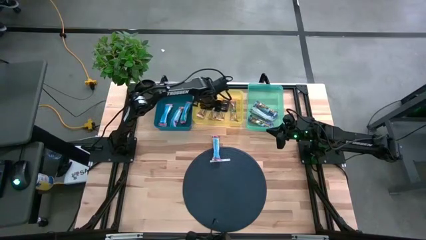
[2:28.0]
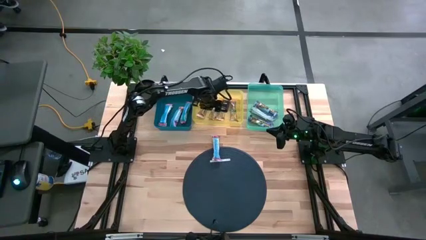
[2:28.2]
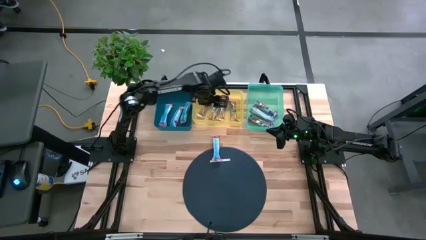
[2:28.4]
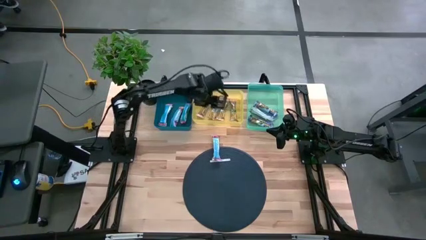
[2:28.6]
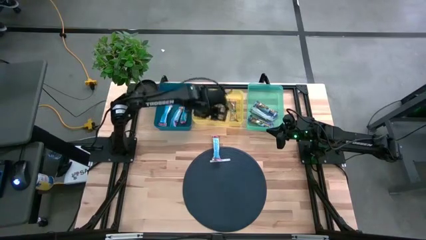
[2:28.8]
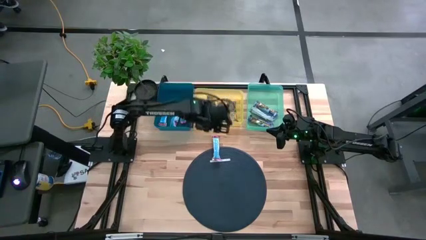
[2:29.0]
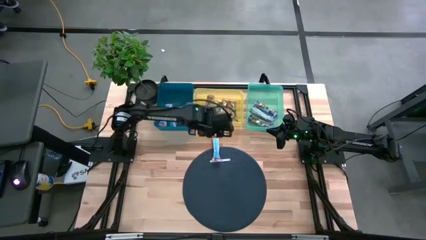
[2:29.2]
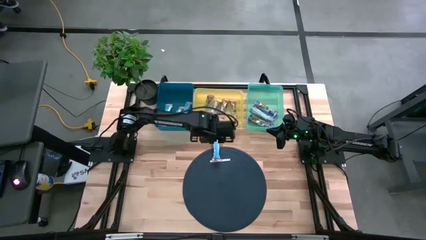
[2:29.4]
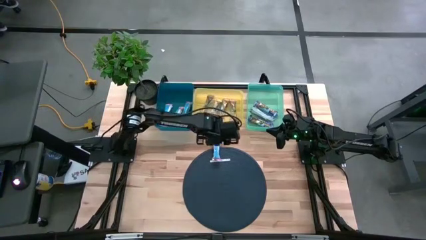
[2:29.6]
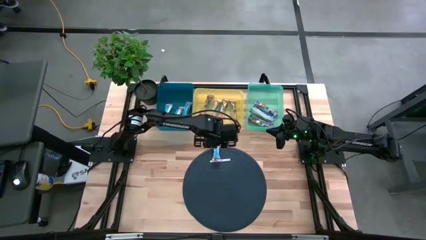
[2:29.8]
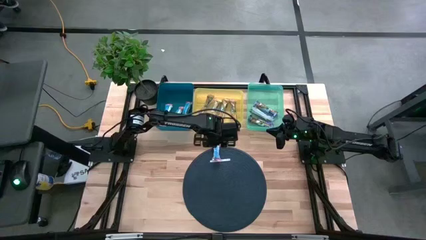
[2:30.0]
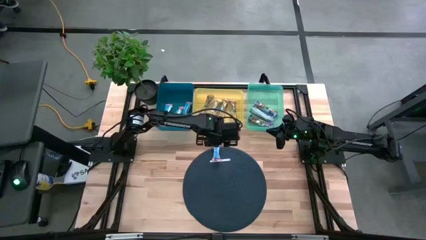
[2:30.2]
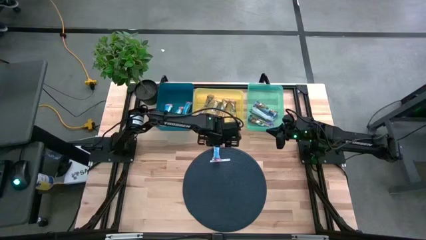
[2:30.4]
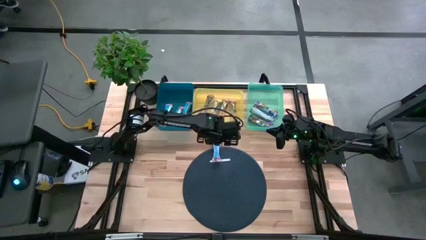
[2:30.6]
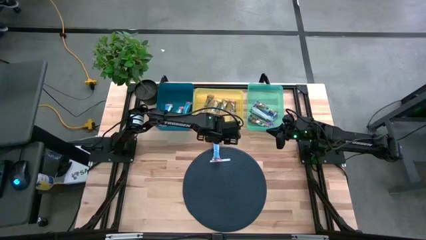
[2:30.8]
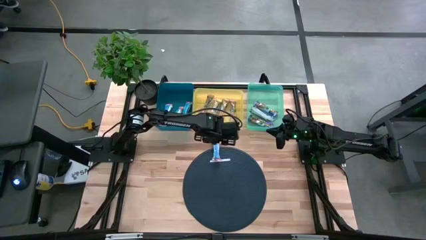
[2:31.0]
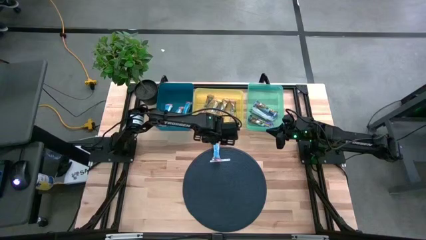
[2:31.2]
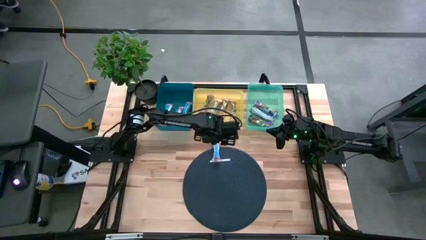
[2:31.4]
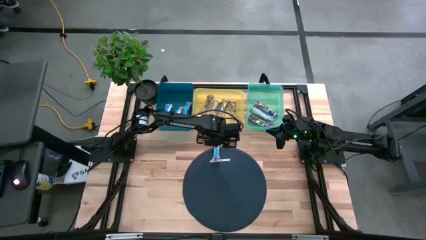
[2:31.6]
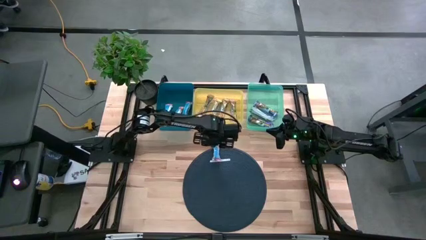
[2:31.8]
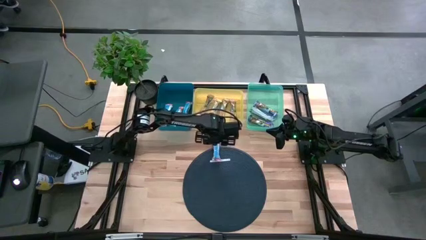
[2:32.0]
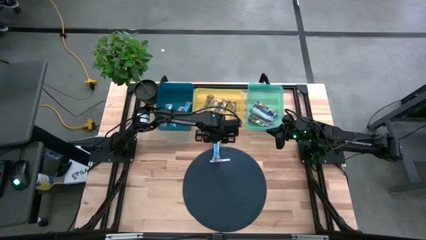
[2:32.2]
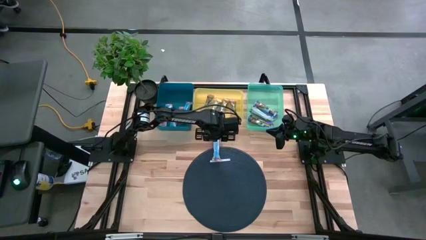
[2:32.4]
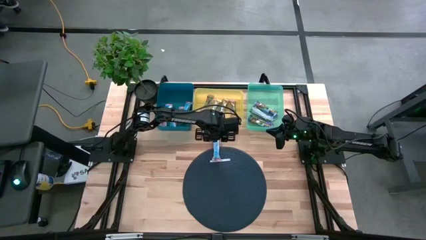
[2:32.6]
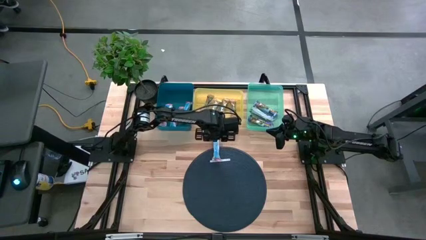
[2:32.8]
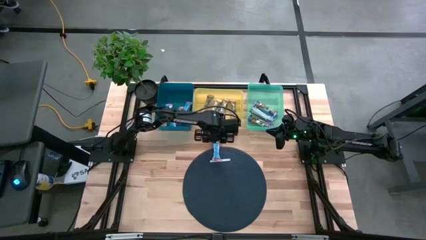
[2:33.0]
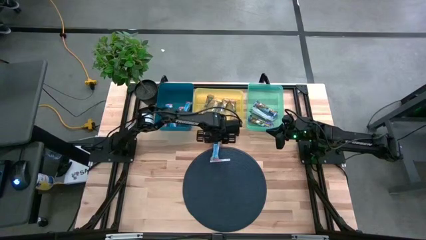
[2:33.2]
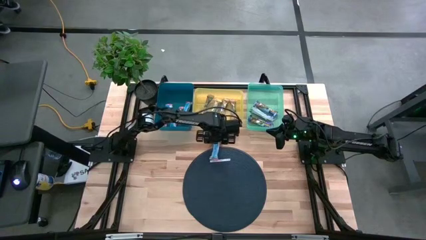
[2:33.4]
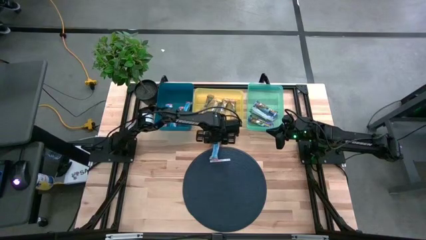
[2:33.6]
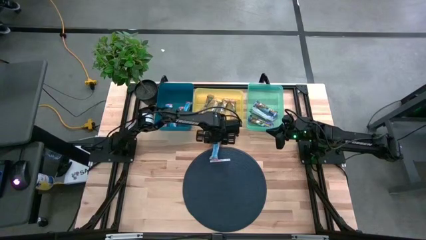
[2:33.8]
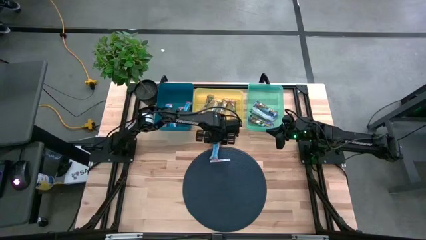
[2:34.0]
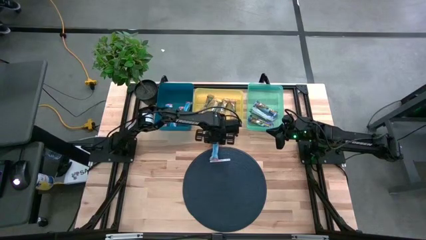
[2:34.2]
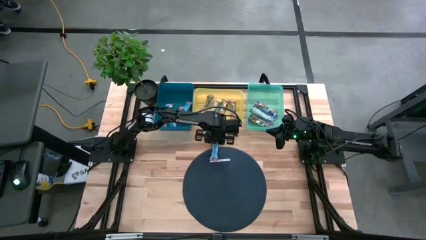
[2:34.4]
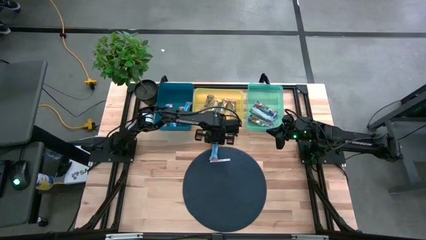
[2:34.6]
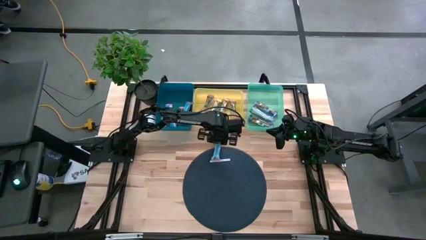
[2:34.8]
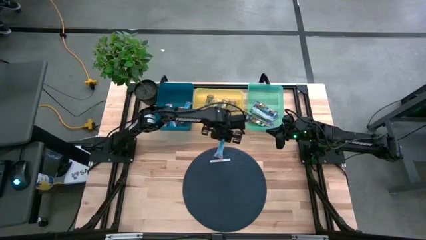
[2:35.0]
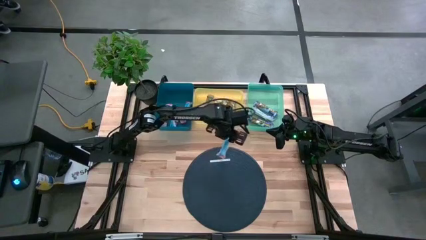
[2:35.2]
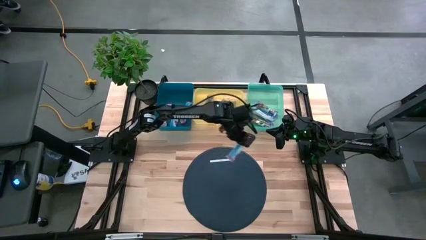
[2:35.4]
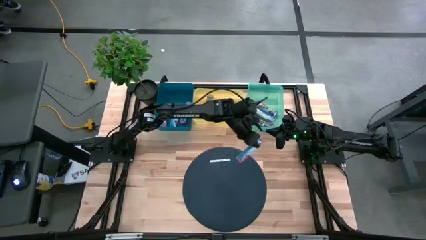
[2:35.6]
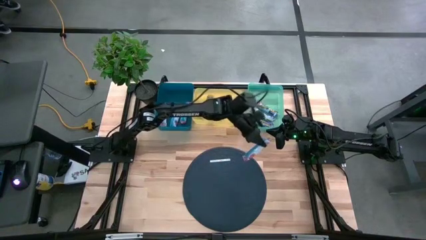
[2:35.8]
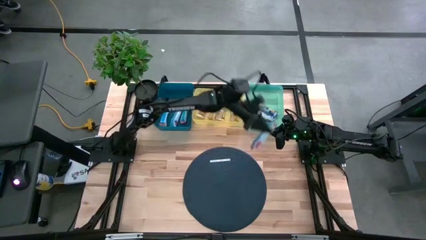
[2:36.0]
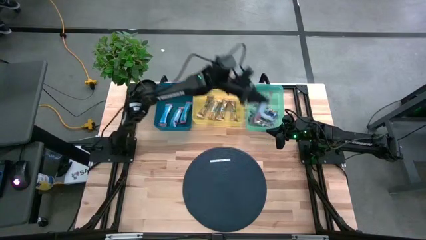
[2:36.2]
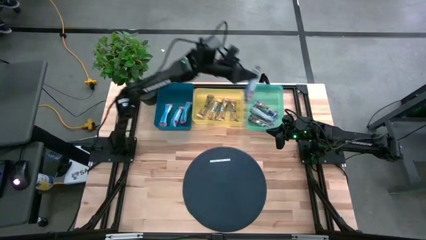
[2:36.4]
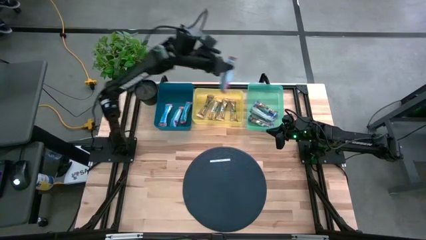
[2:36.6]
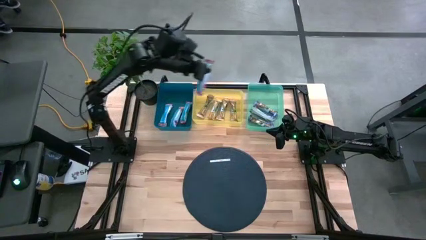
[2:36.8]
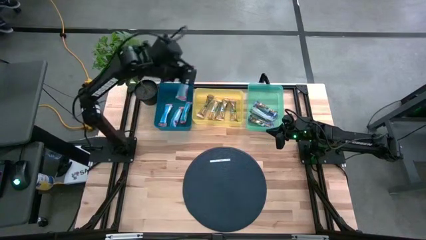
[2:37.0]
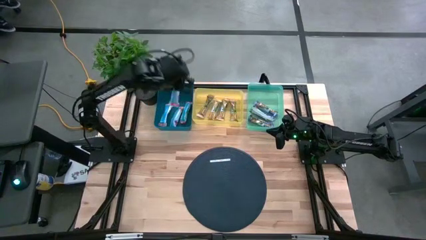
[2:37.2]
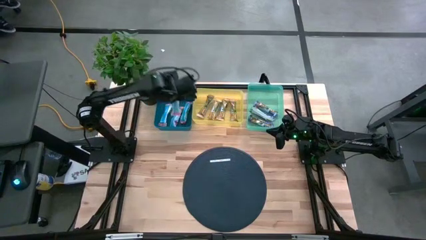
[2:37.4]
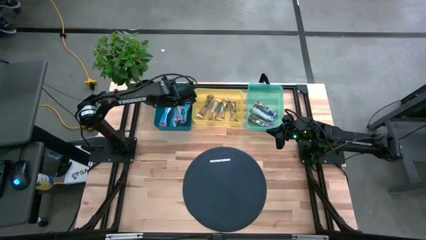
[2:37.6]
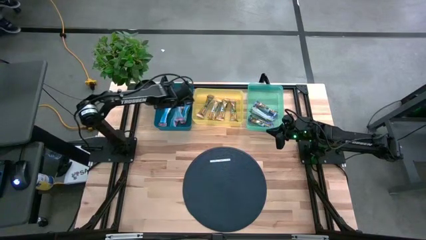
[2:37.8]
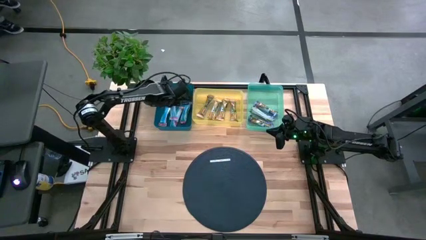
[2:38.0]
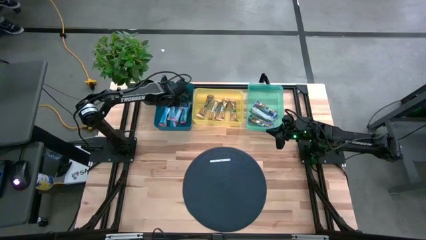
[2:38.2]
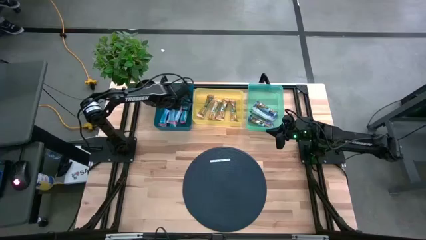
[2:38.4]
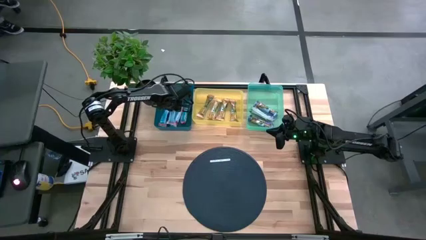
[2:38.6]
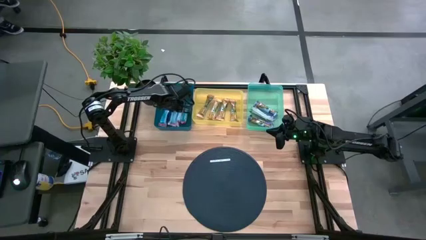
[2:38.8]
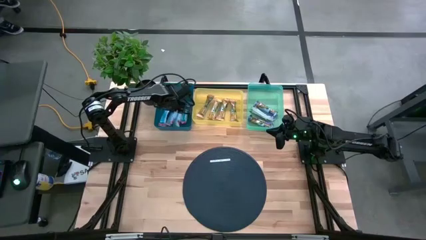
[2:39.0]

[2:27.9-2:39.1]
Task: Pick and place Granola Bars by type
Put the red granola bar into the blue bin

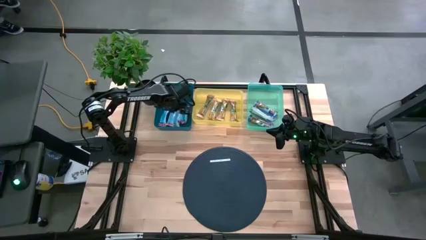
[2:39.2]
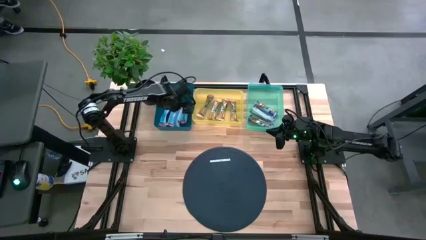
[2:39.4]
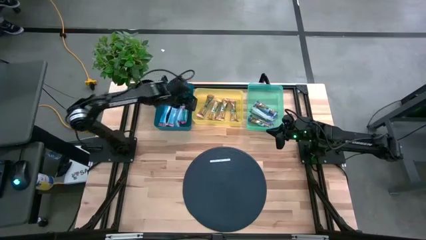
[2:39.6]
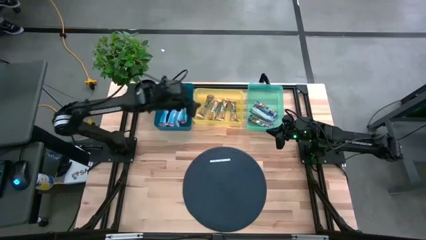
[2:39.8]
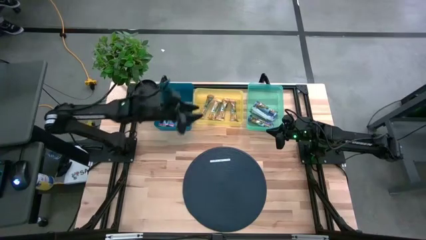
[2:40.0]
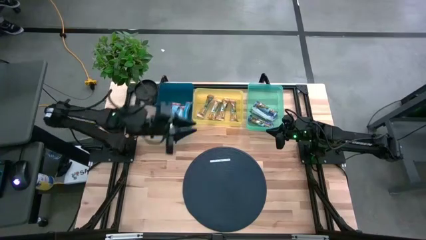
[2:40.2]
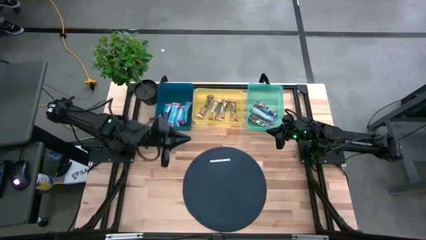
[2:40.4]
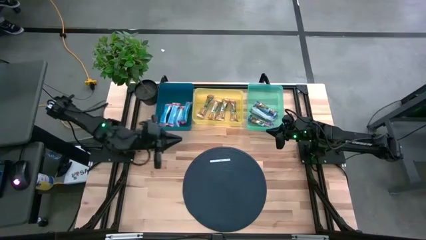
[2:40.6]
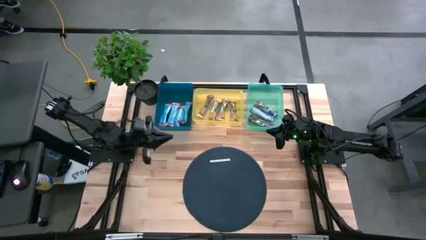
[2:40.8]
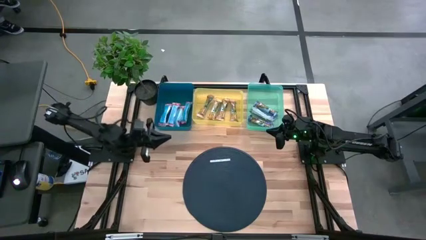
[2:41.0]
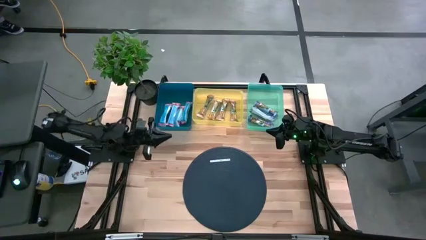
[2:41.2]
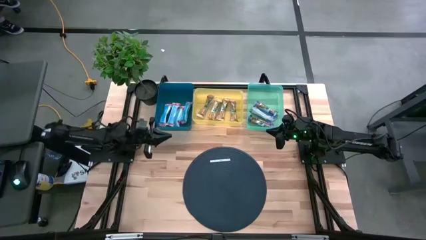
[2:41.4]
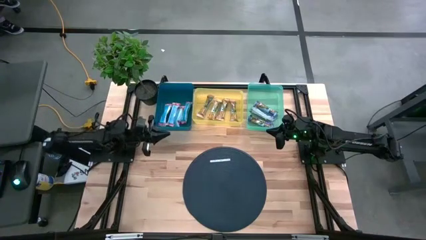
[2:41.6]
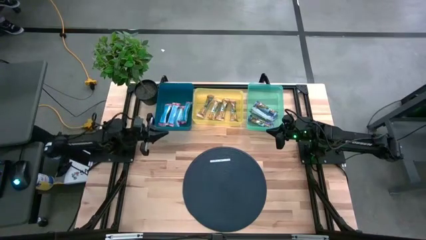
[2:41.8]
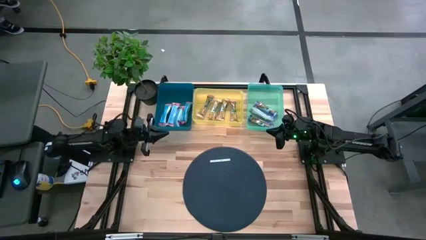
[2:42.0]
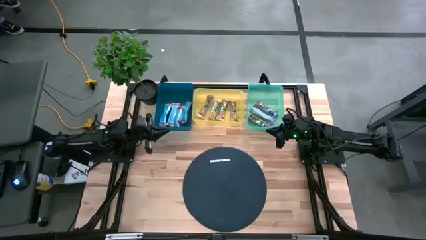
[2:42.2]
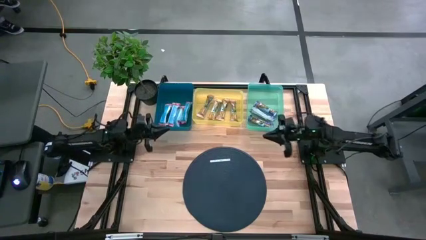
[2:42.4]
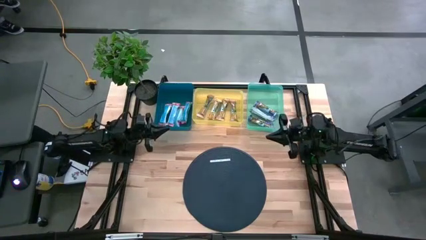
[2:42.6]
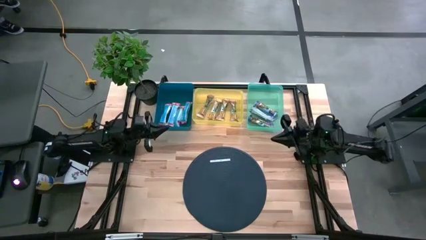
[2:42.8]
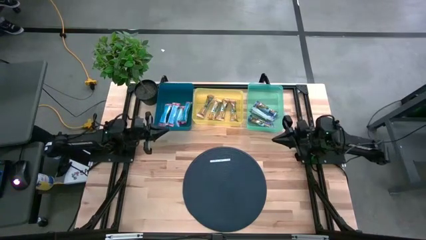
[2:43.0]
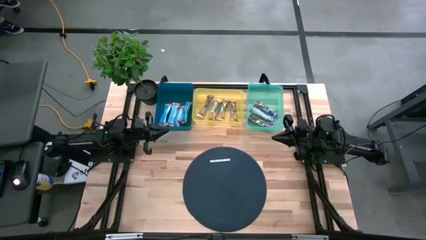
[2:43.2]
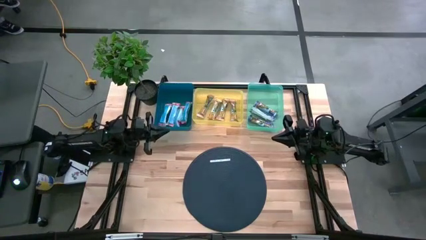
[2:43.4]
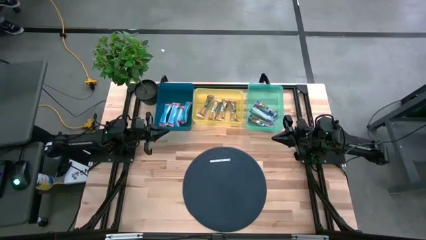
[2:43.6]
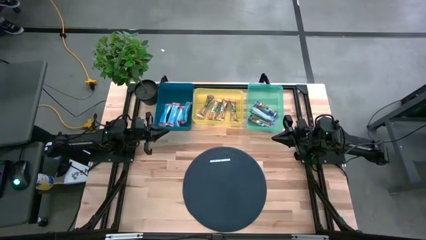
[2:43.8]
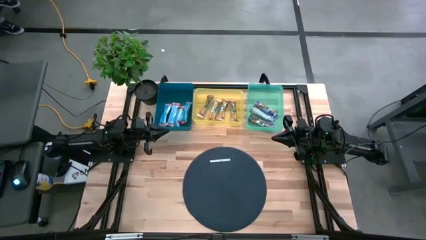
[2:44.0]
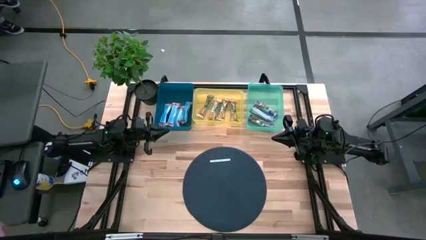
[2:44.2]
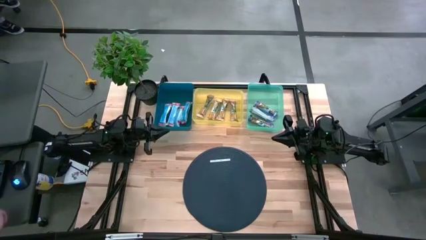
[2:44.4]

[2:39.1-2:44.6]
Return to Home Position
